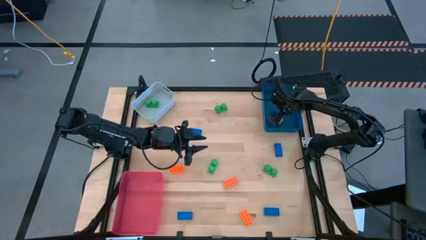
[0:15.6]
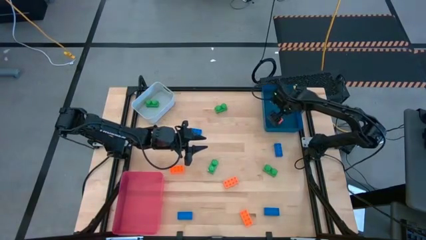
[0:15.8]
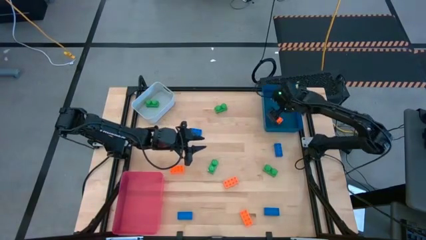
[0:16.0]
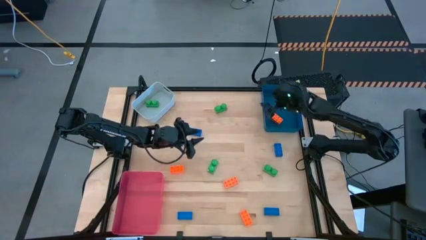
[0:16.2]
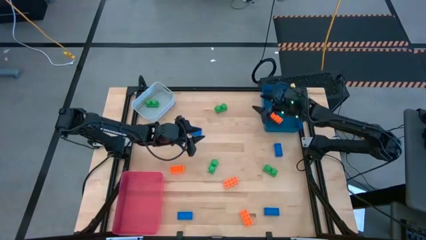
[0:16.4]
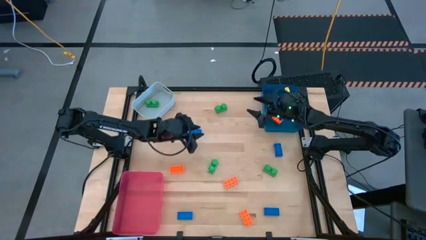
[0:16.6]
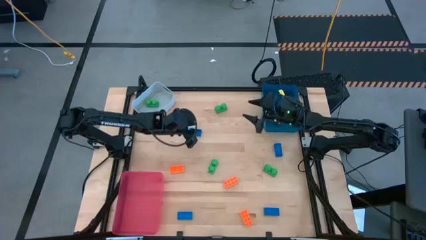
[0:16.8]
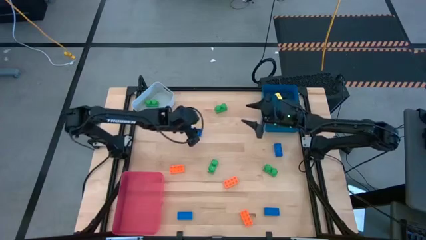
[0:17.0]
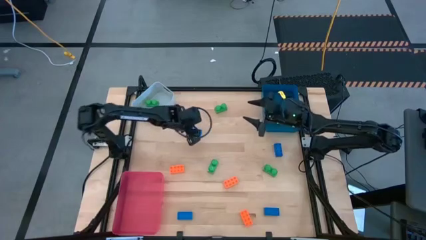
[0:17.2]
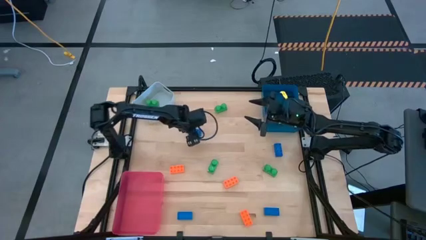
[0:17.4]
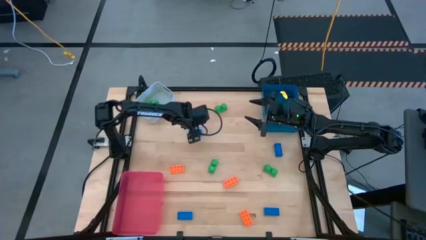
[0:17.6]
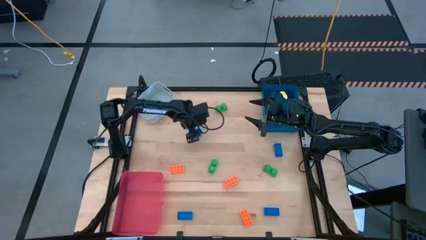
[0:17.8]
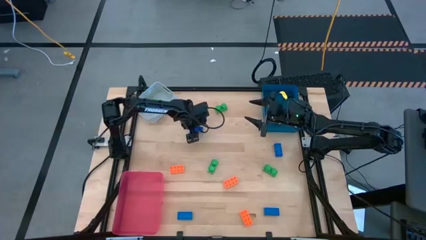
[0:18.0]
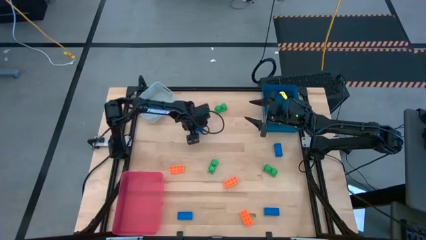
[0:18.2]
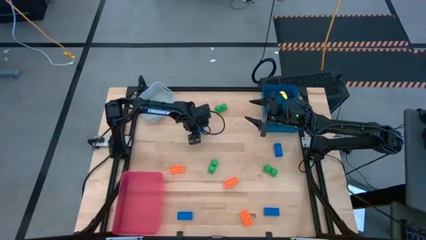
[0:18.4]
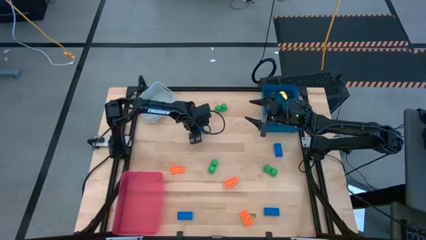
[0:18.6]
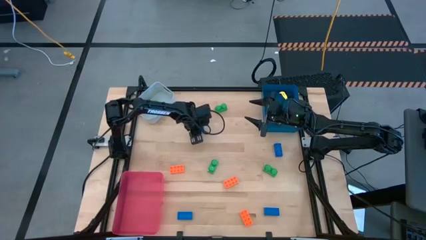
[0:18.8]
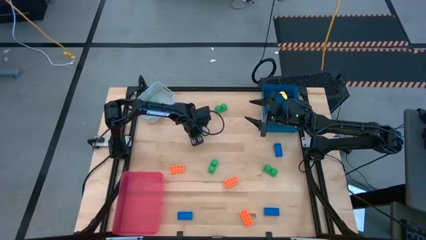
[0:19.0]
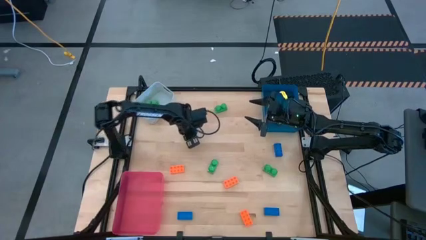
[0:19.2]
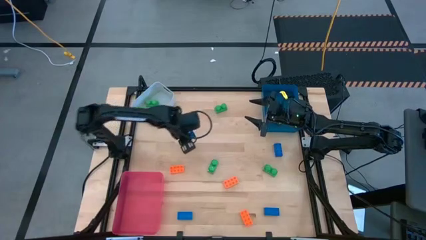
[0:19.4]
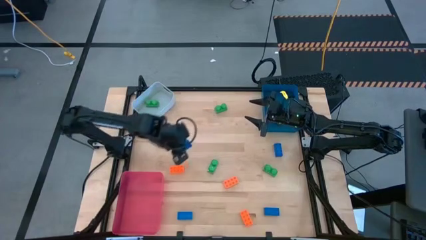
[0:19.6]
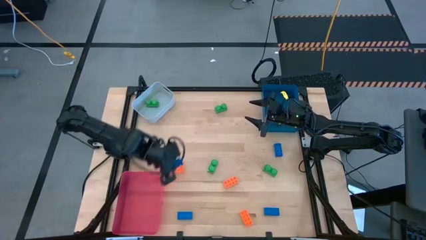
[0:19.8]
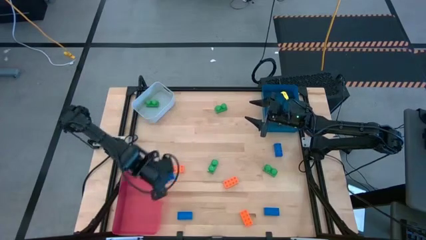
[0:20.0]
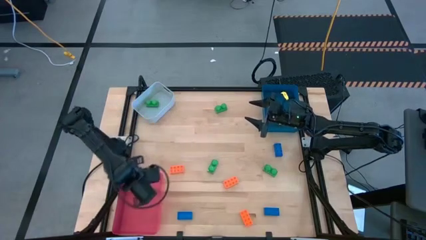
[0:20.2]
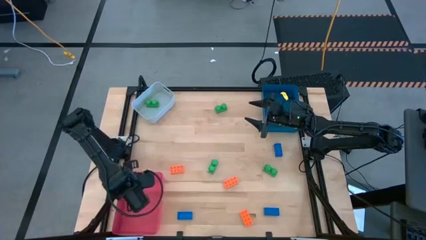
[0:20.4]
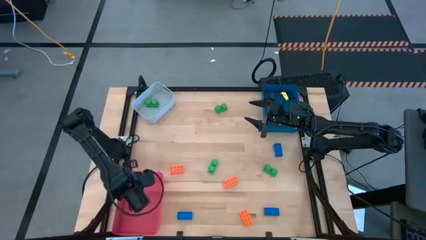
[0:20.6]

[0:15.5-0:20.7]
Task: Sort & place blocks by color
Put the blue game piece into the red bin

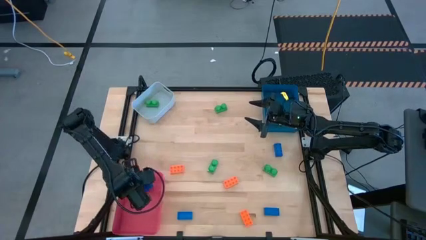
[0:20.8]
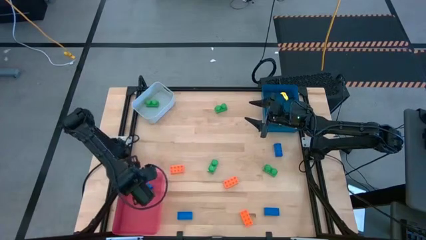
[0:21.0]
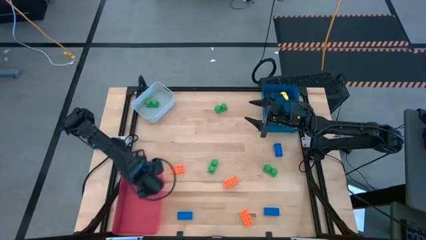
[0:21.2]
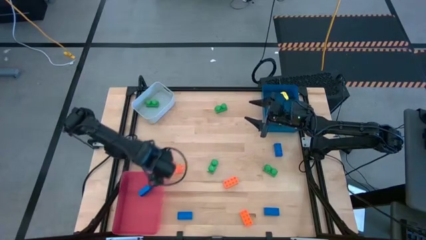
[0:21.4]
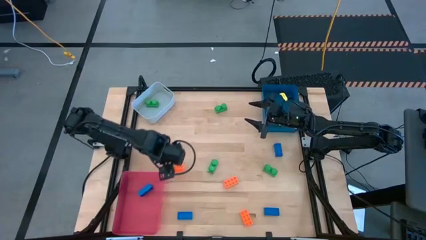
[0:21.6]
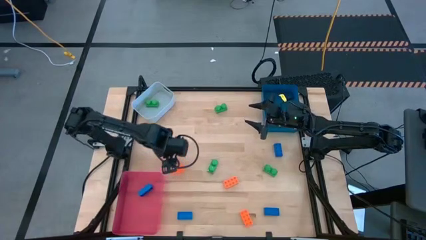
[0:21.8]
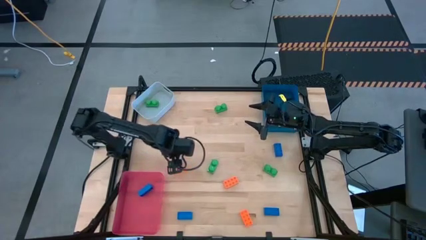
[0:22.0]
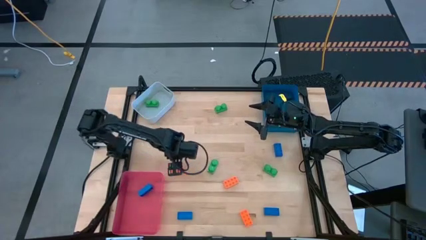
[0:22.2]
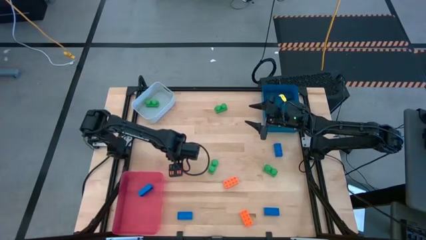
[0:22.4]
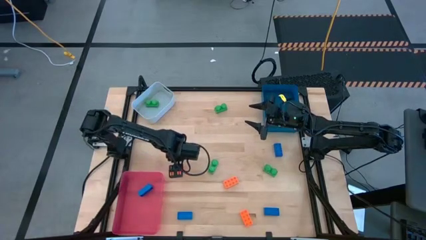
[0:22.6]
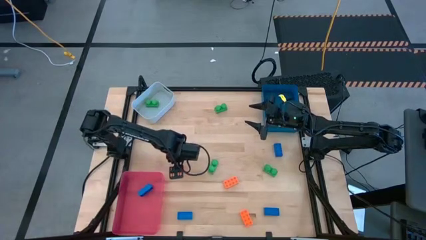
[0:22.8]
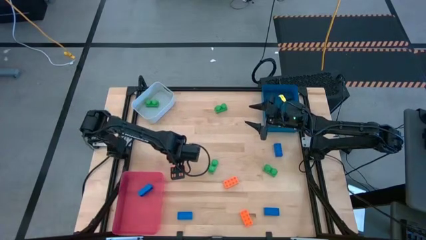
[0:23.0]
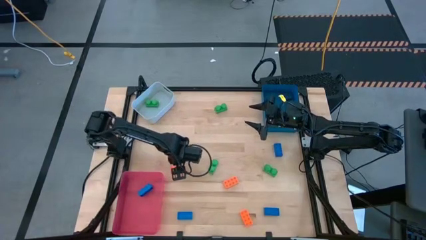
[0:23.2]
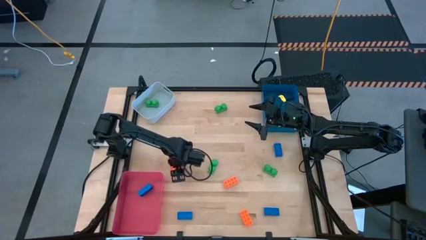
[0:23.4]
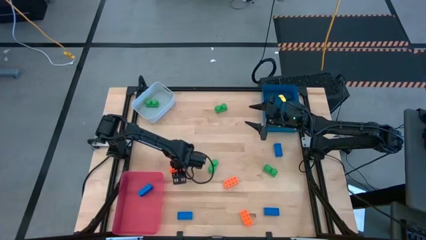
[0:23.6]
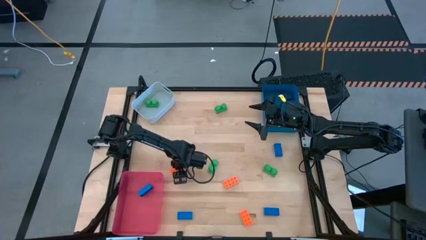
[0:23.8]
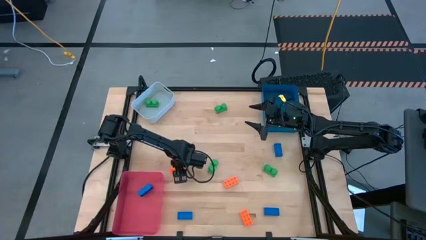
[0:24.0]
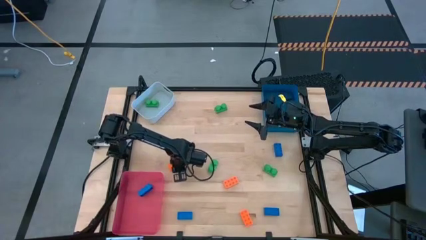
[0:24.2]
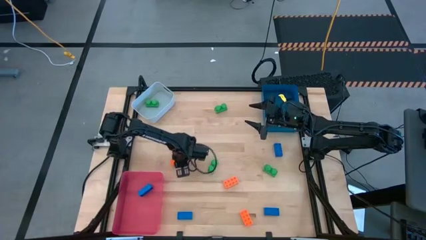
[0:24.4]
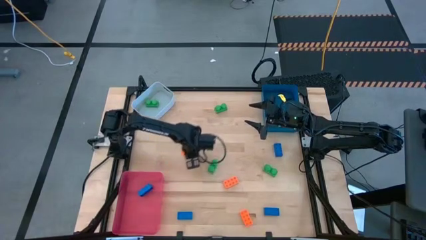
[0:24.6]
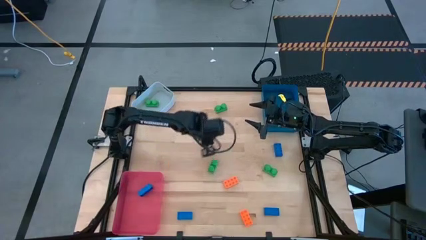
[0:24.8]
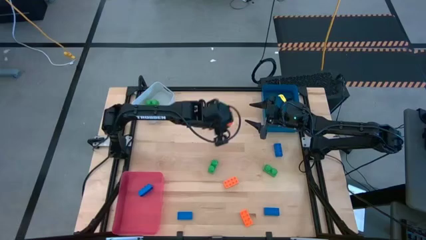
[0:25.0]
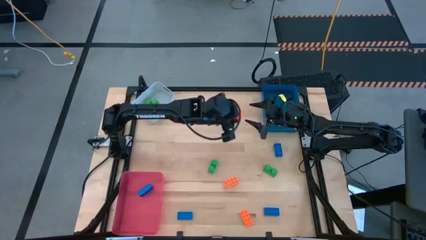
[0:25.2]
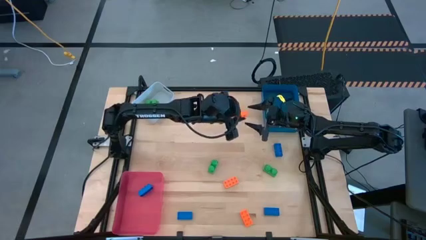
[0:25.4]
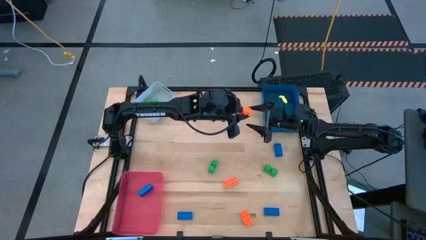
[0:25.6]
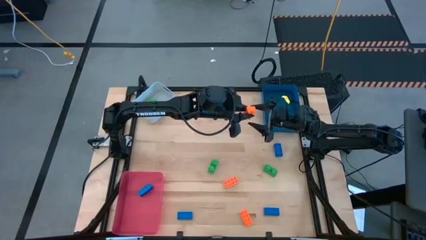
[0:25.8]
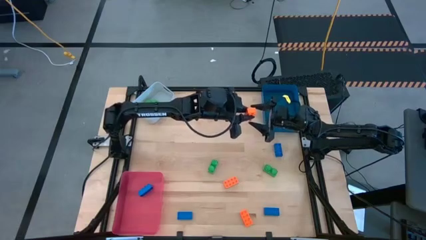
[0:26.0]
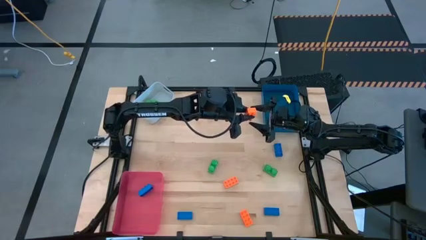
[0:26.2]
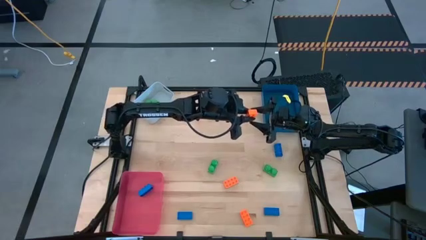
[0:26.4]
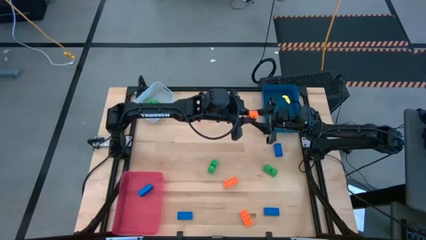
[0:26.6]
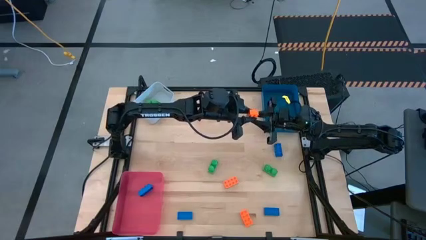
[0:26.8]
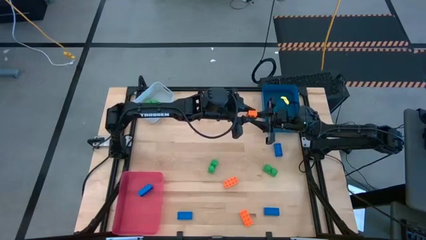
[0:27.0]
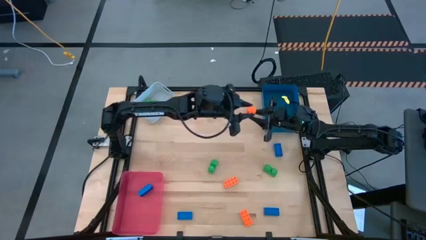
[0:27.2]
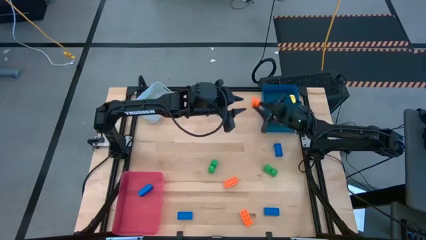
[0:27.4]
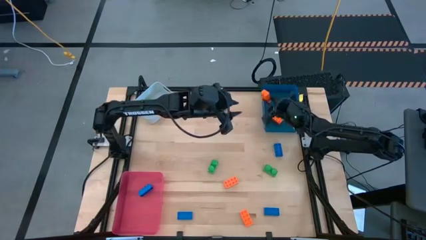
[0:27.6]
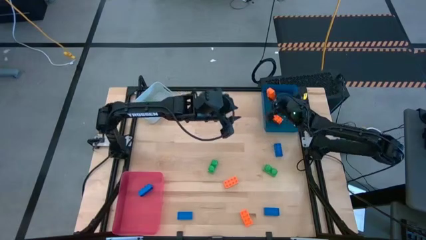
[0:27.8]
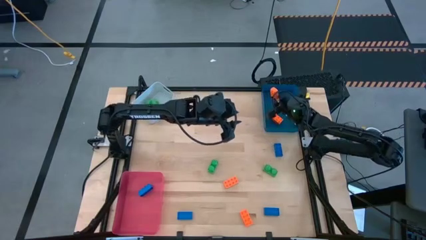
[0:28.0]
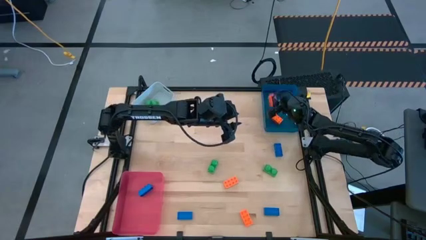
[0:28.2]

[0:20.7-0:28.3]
Put the orange game piece into the blue bin

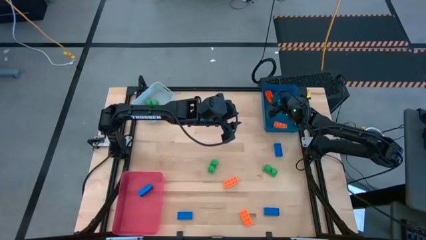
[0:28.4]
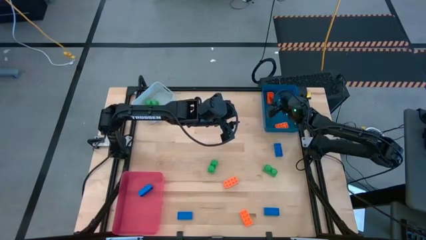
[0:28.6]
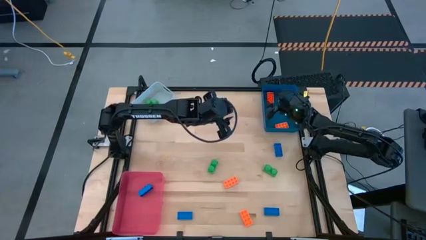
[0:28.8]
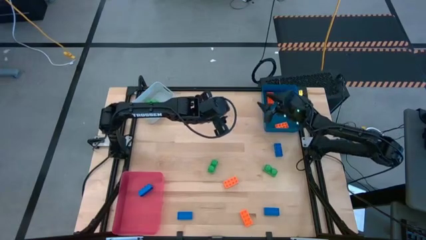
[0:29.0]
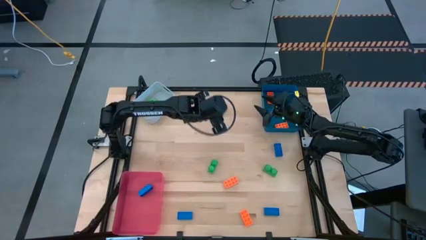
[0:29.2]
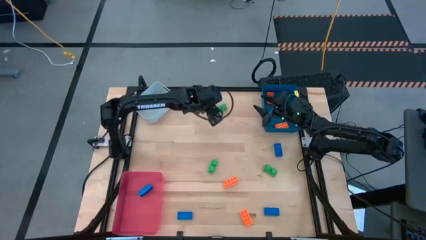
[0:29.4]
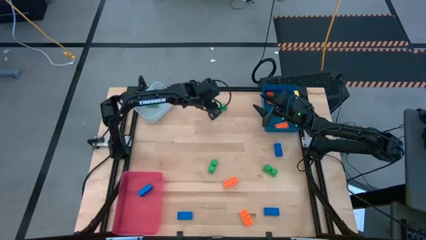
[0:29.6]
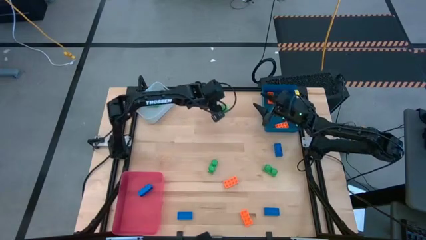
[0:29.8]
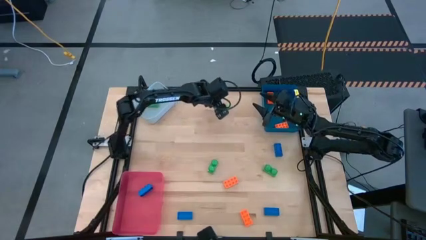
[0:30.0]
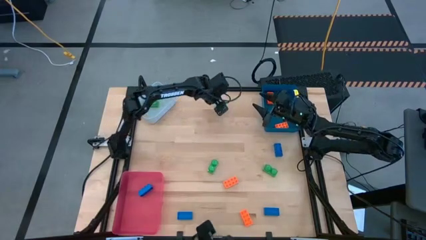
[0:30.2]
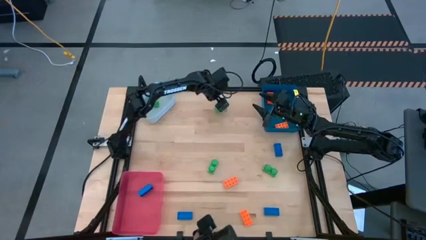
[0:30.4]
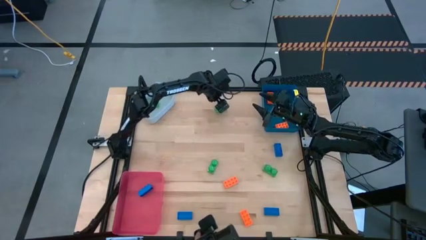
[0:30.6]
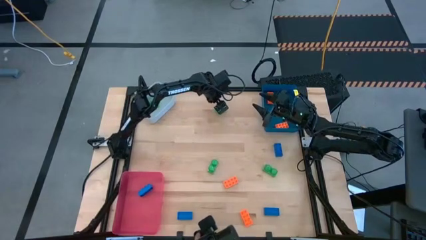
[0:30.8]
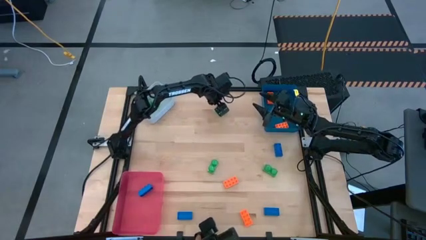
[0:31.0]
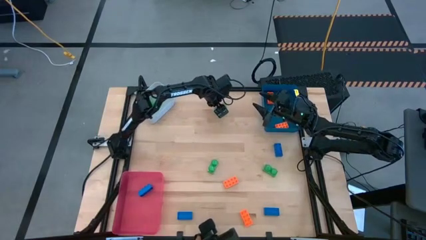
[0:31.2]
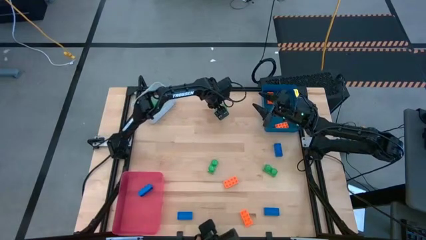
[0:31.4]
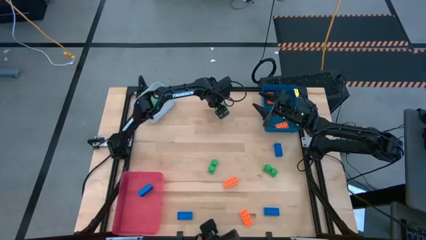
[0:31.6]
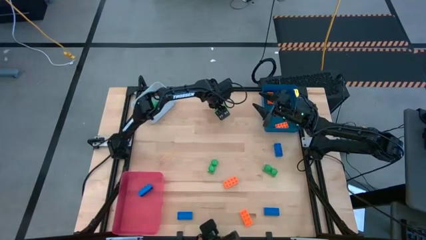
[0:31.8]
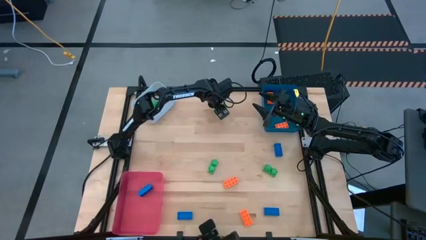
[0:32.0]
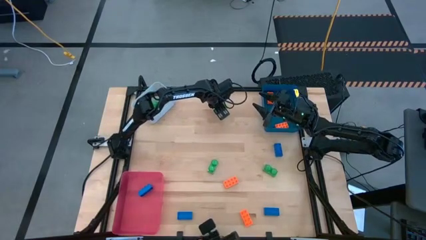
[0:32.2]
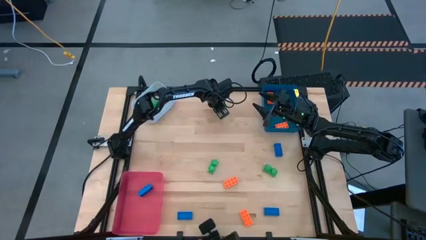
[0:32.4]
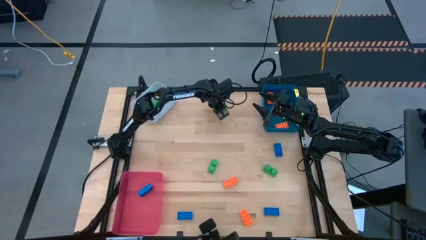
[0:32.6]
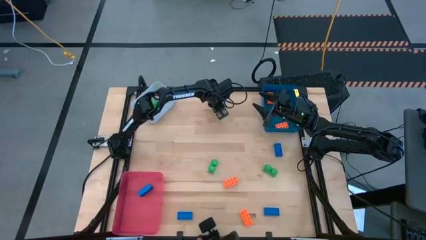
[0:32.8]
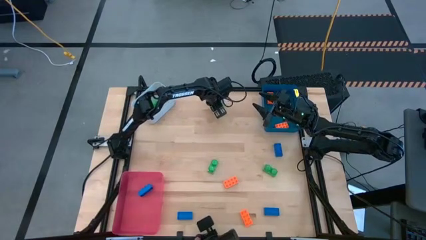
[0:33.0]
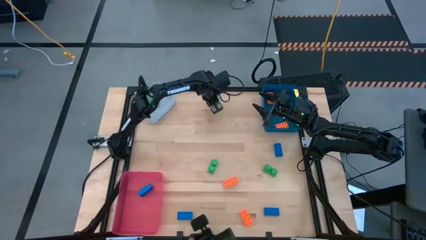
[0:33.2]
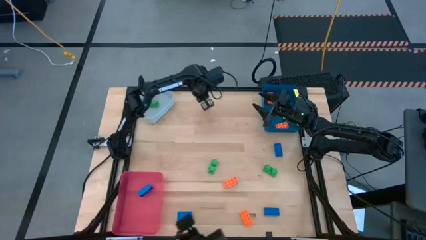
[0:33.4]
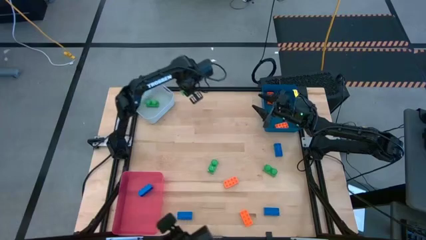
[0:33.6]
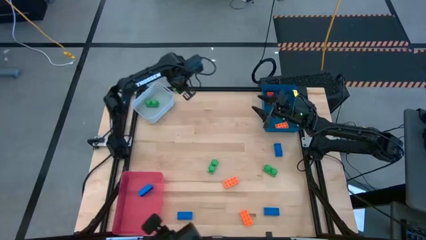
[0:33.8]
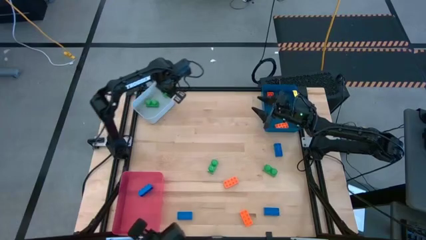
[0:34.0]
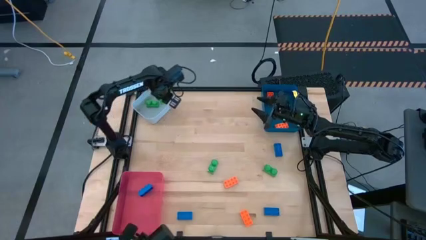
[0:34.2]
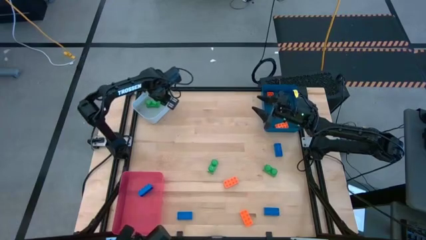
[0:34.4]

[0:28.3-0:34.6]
Put the green game piece into the gray bin
